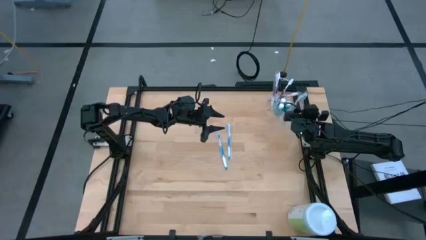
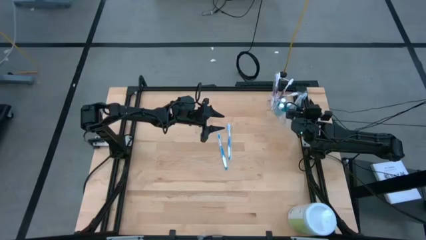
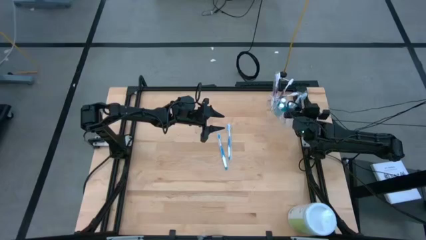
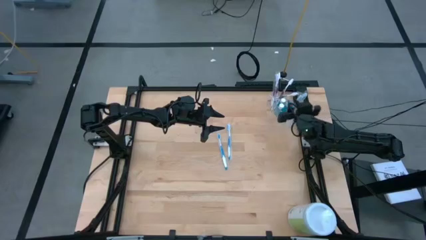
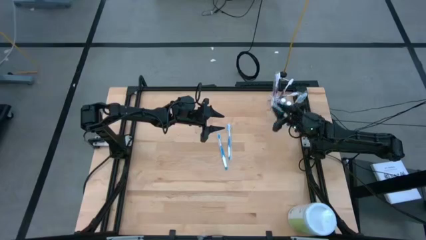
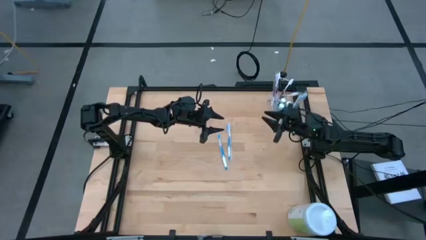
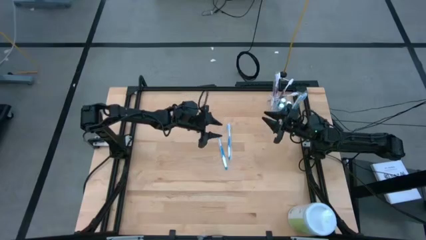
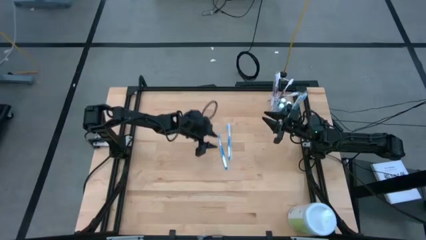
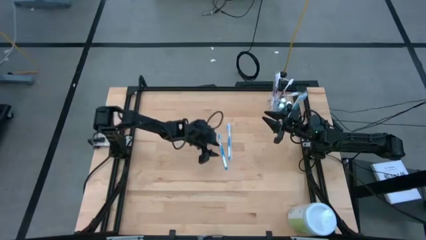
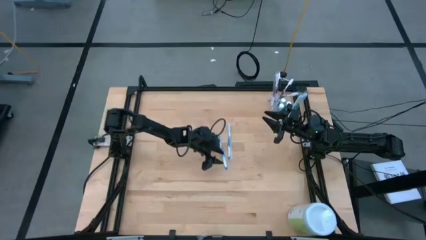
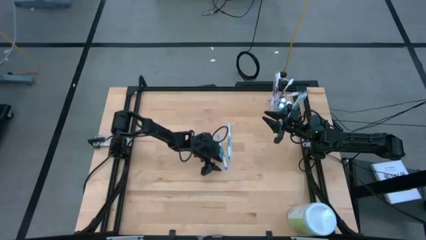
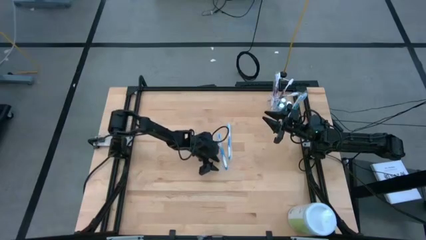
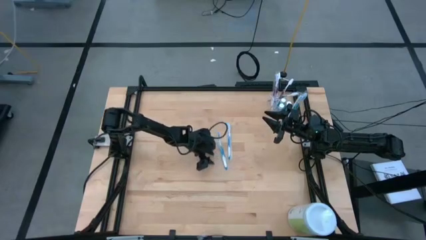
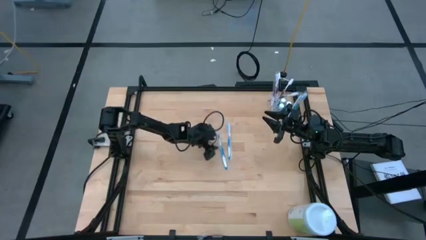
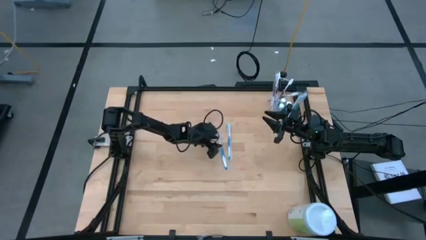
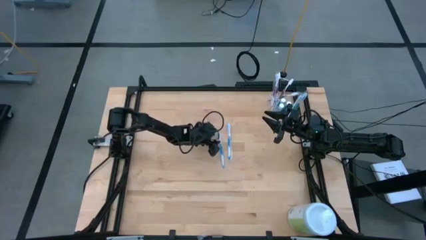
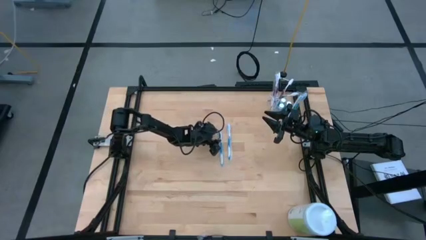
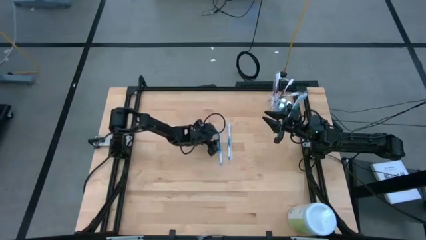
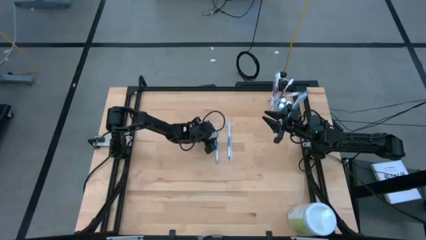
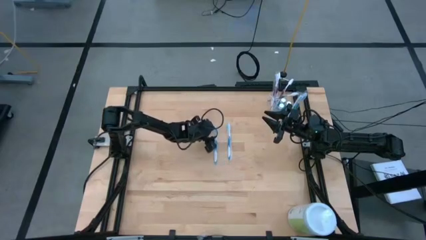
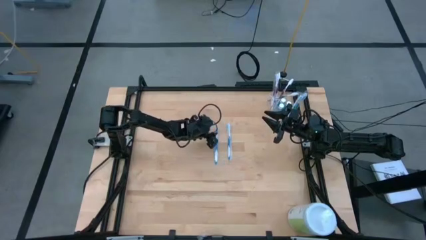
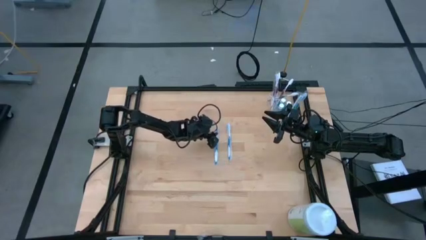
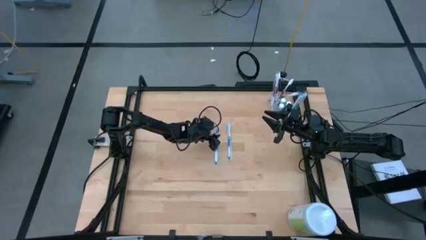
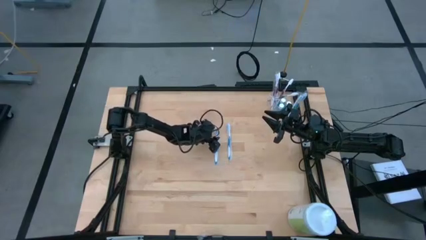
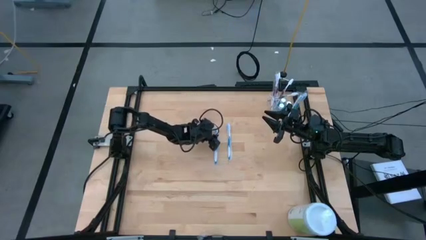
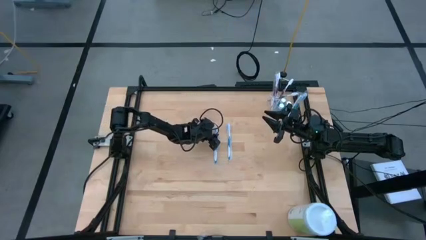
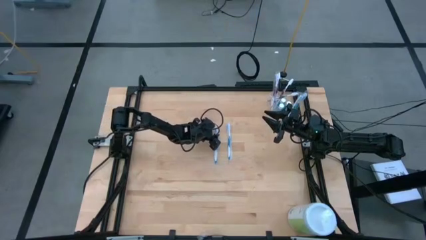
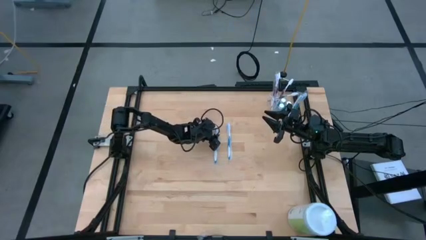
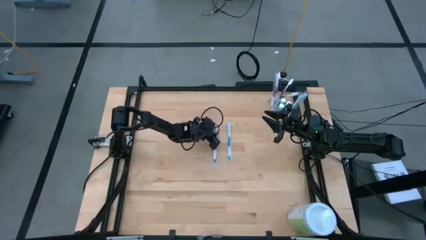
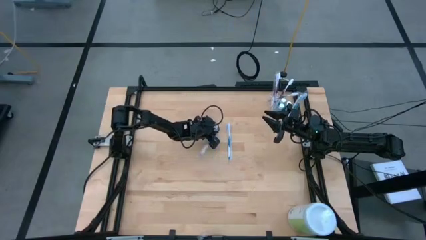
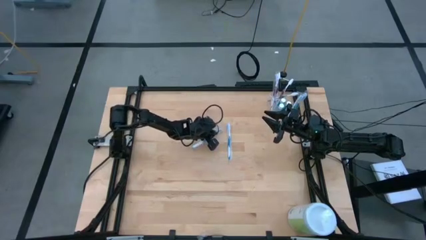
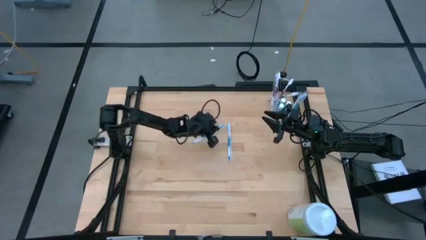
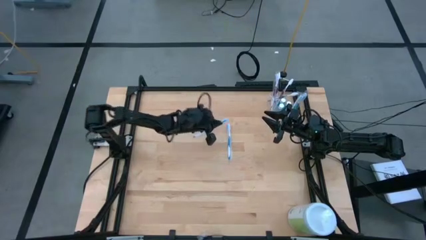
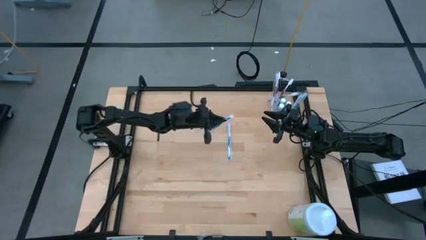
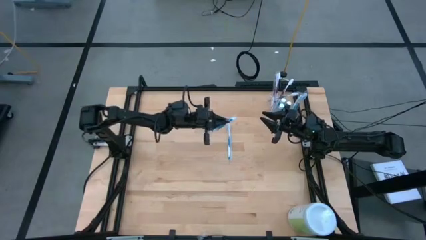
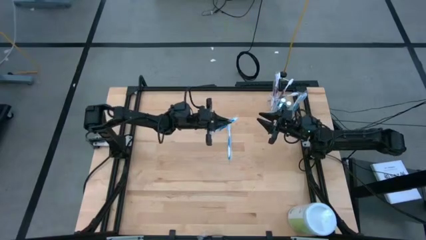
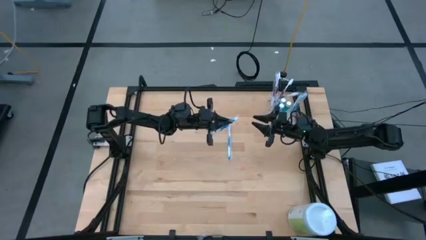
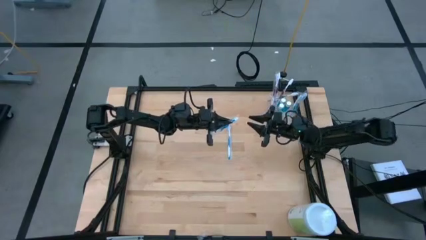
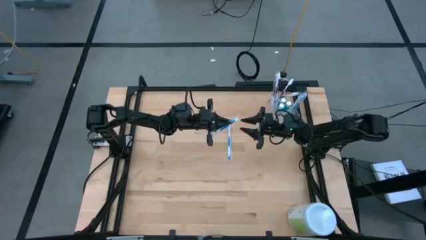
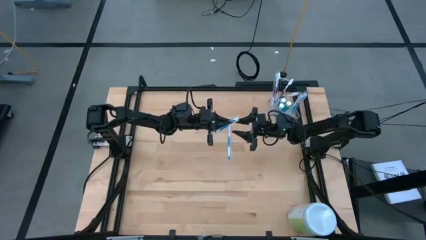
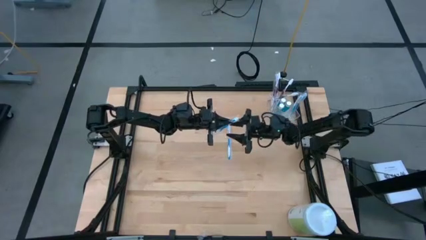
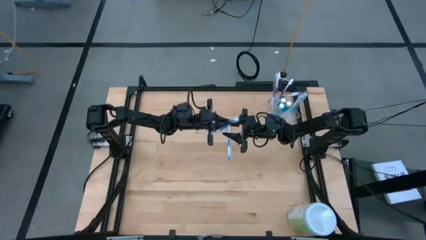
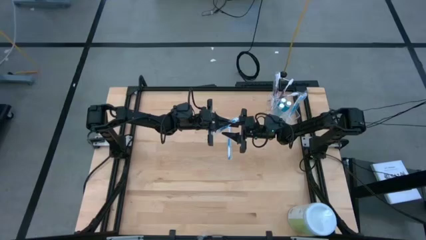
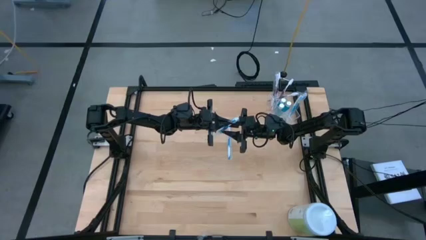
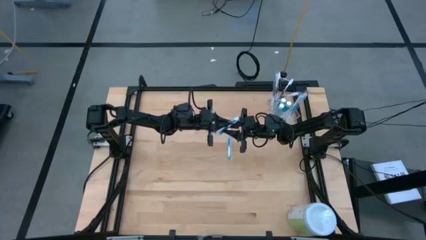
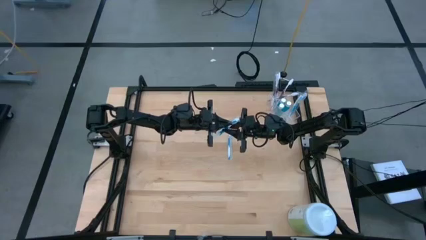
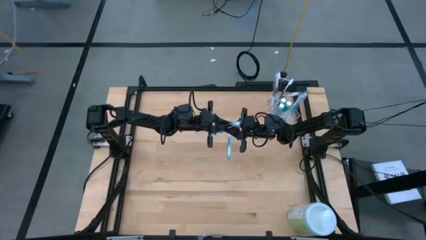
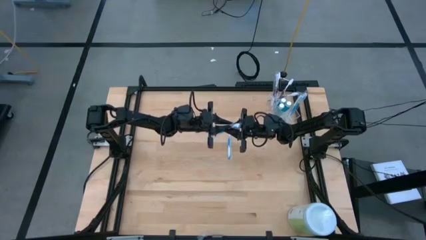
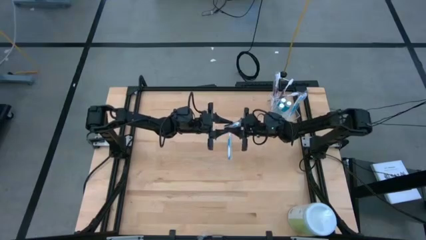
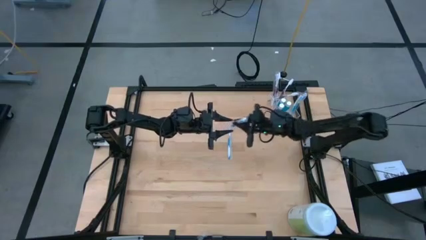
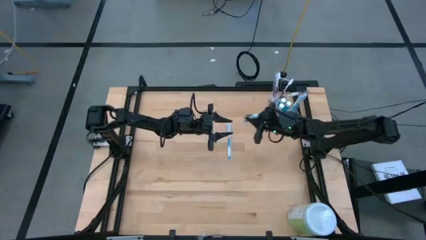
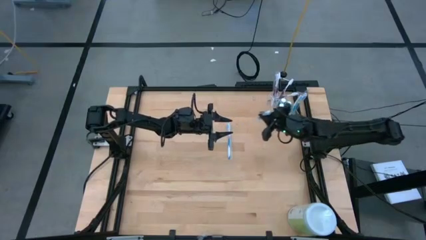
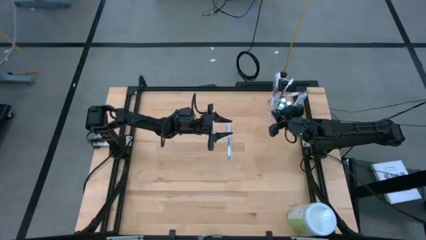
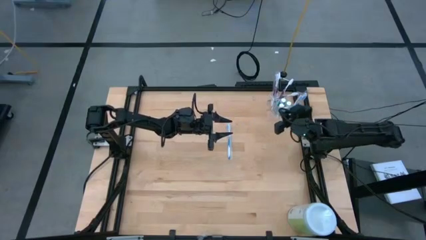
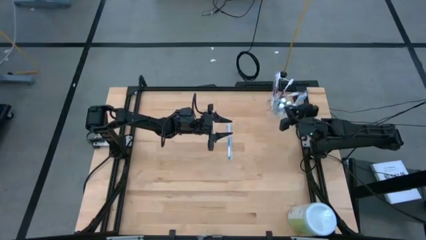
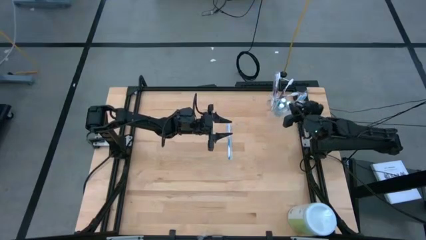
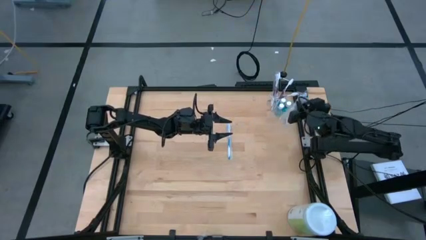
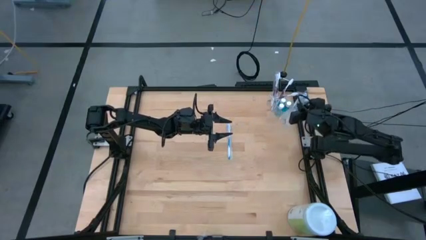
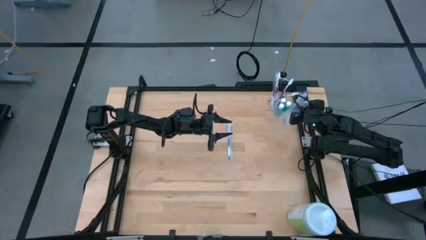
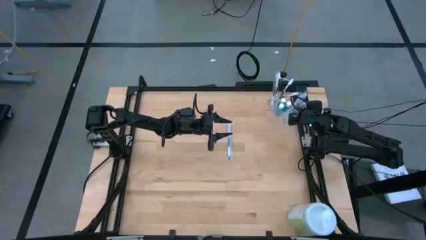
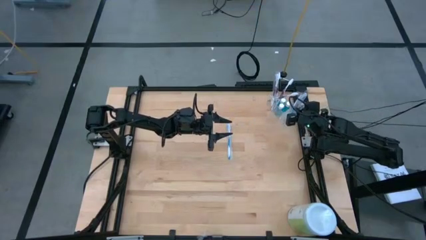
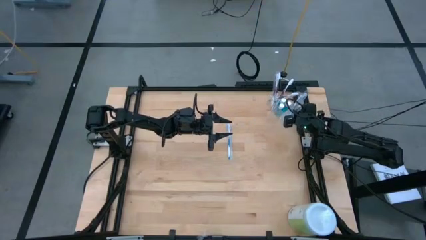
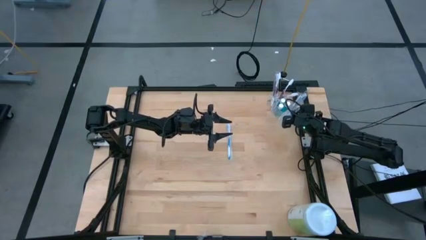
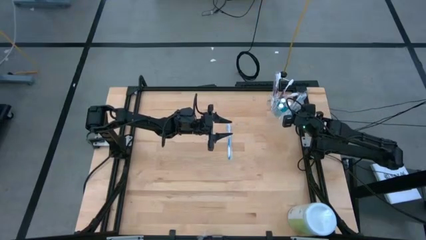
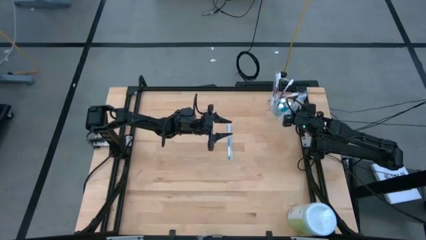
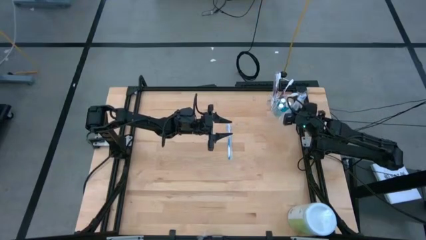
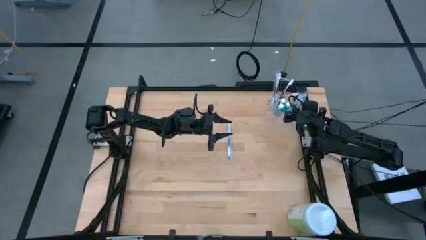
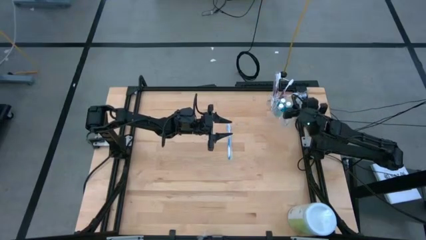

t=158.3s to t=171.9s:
Task: Pick & Place toothbrushing station
Put the blue toothbrush into the right of the transparent organizer
